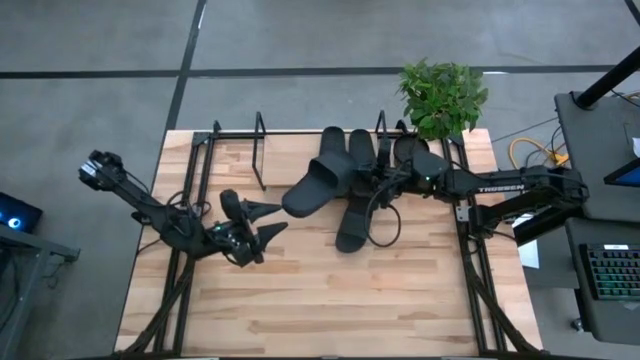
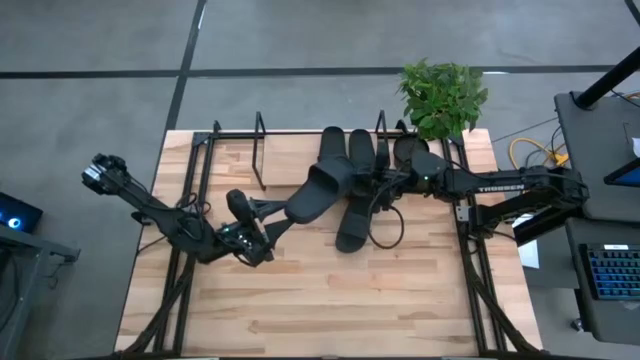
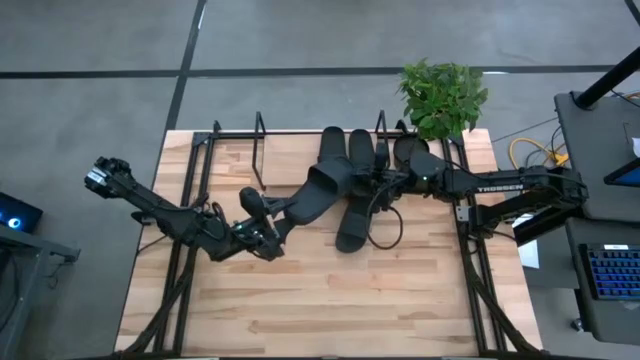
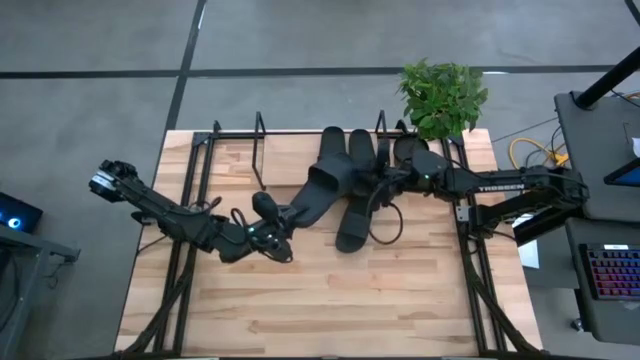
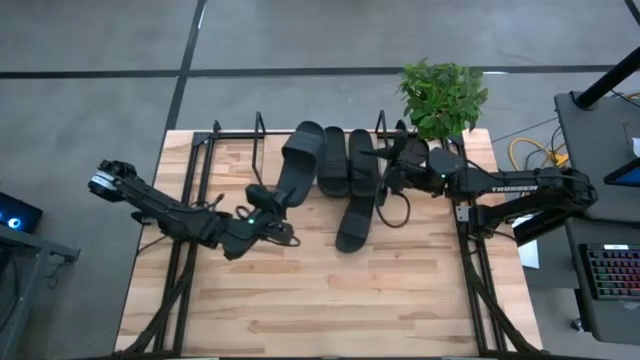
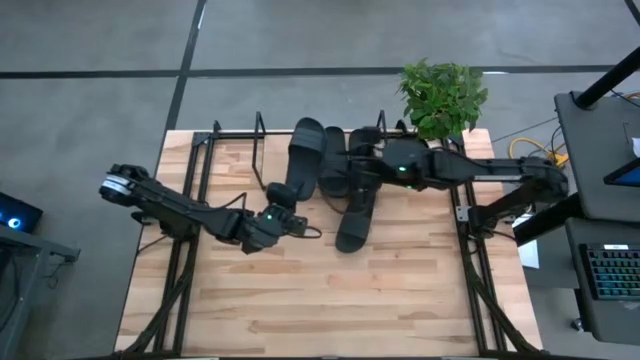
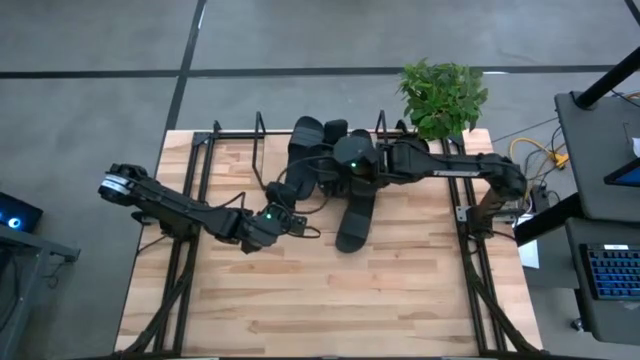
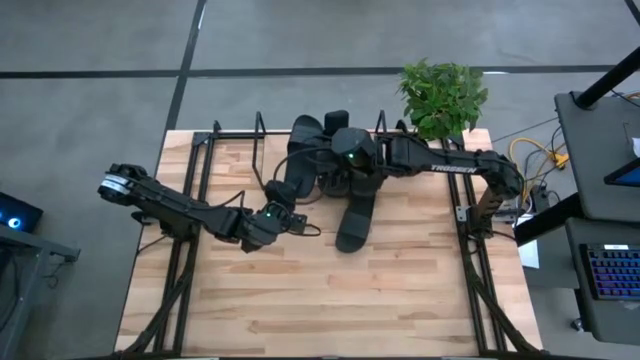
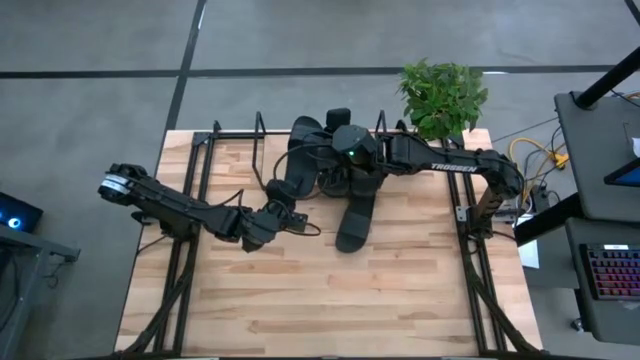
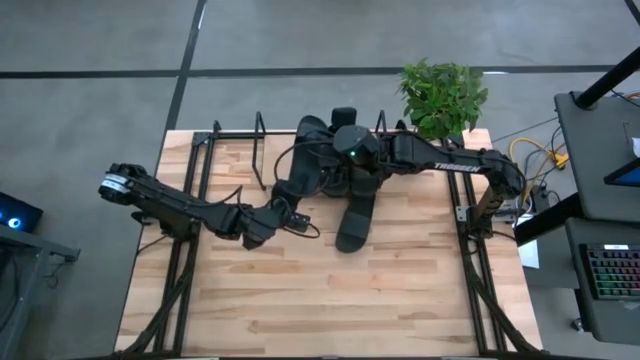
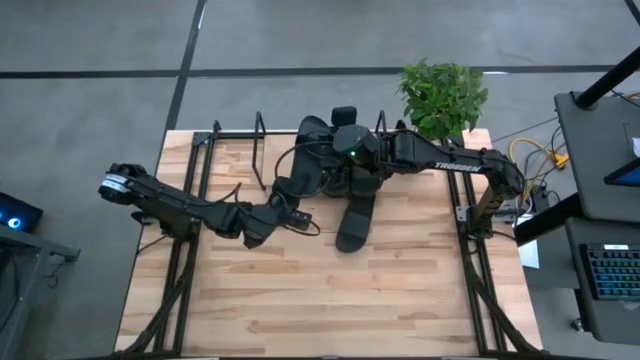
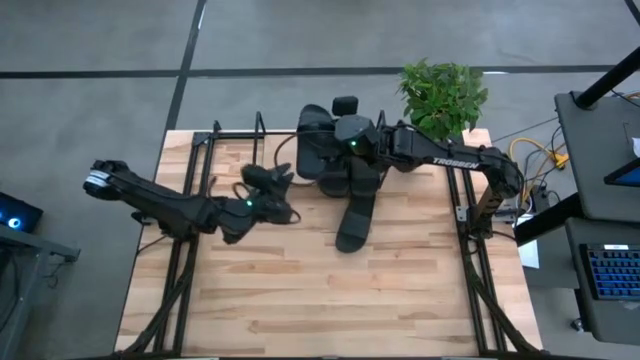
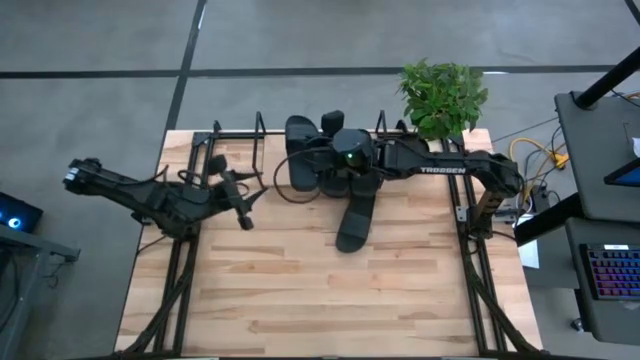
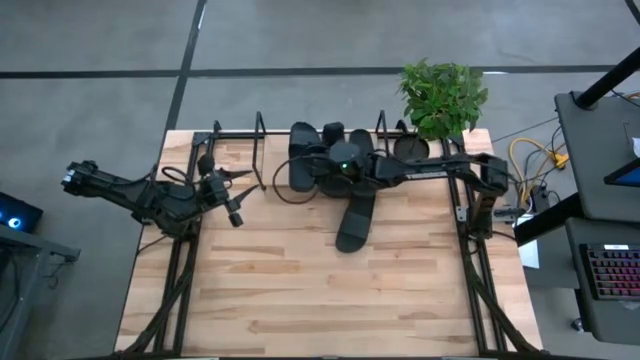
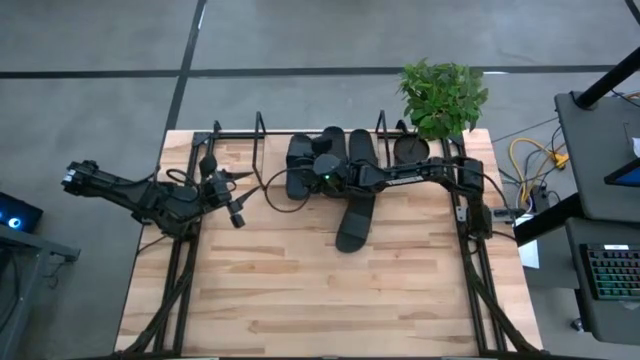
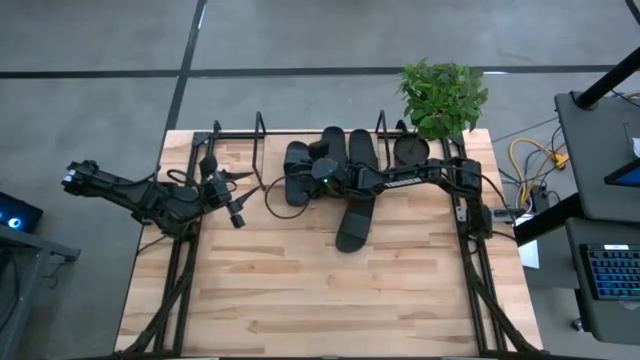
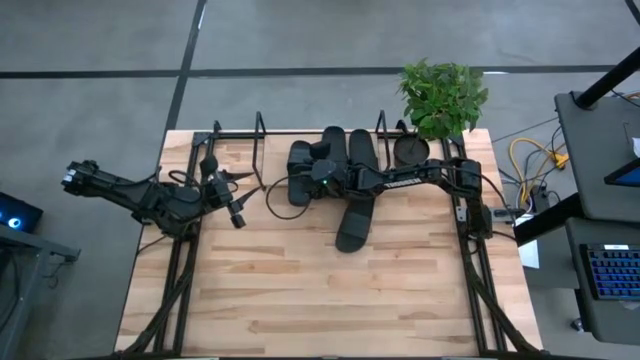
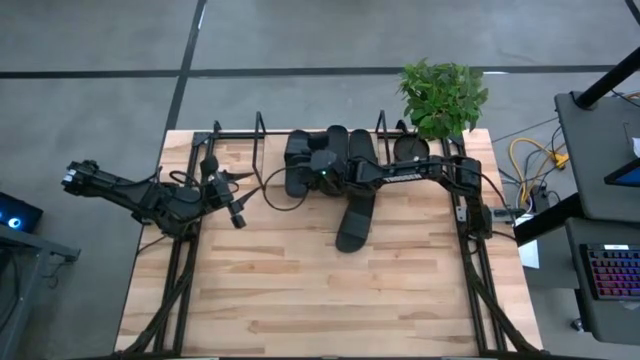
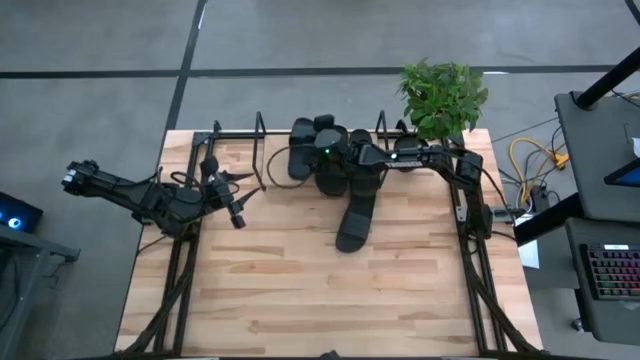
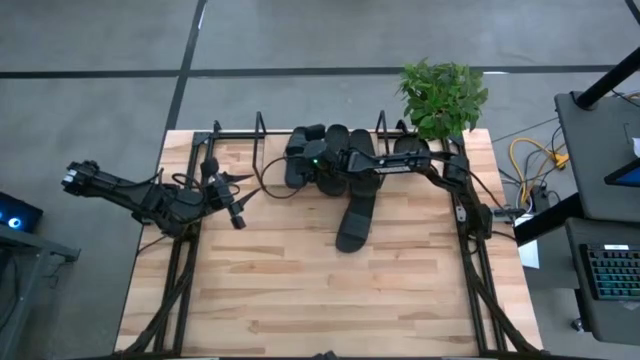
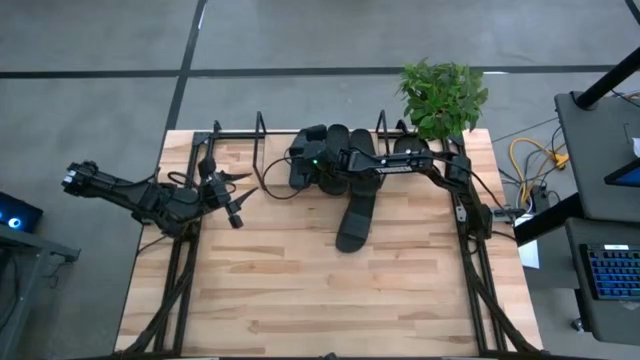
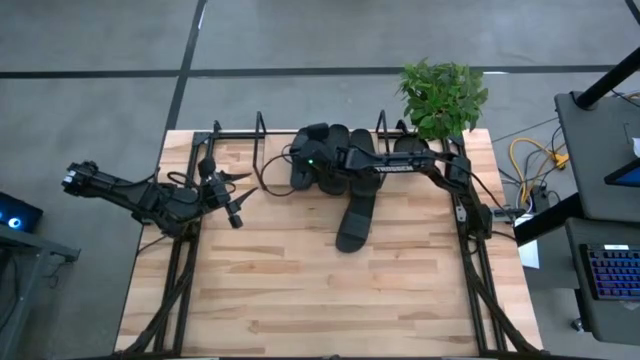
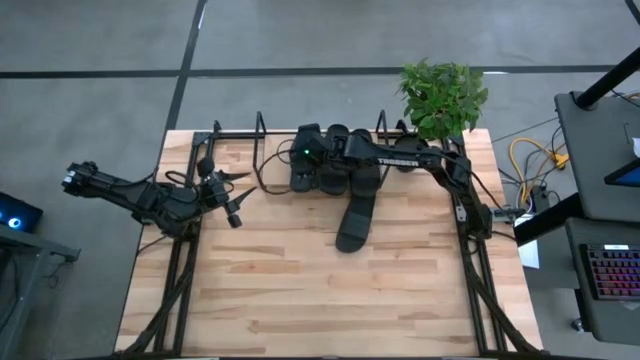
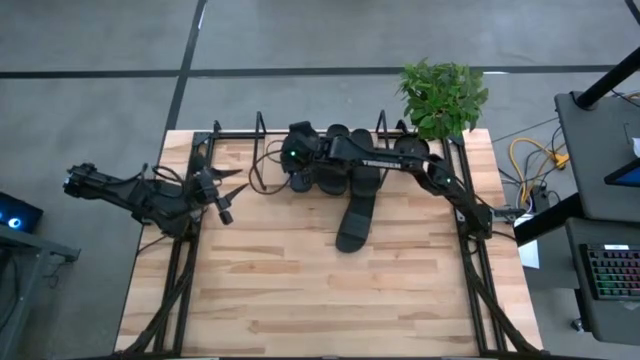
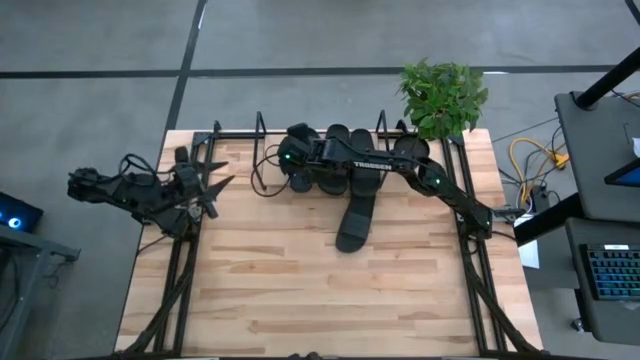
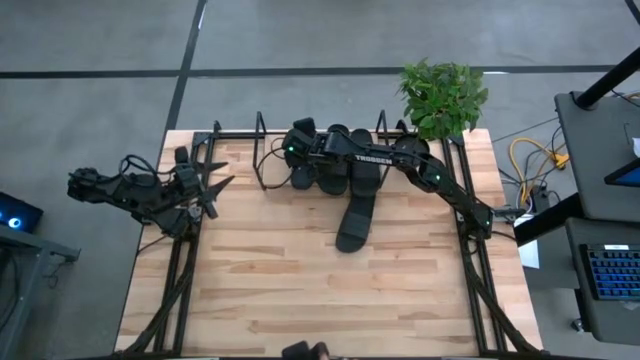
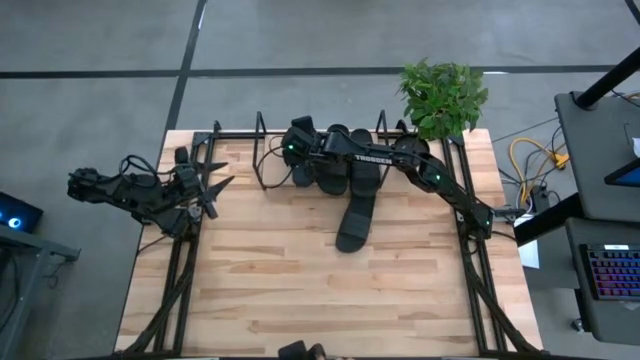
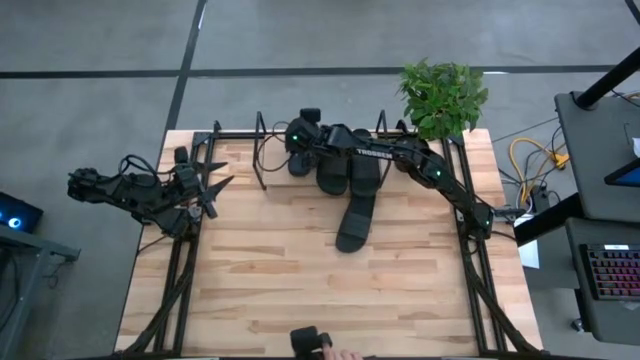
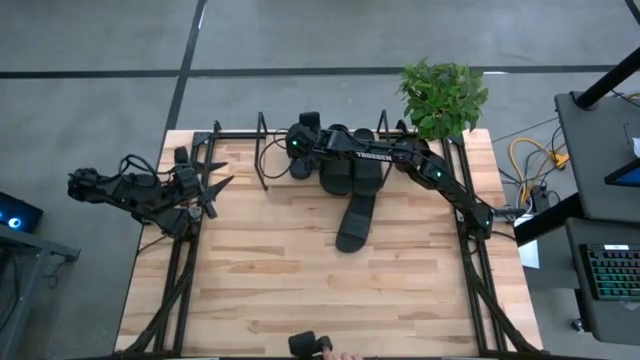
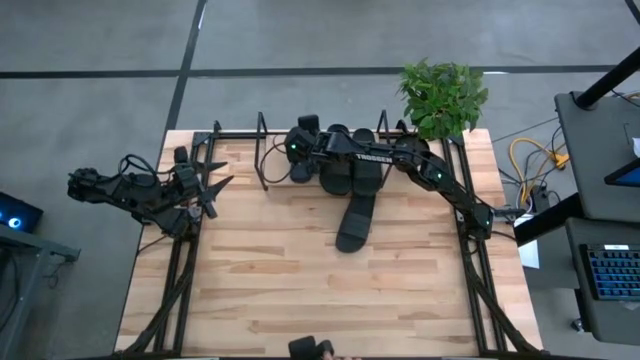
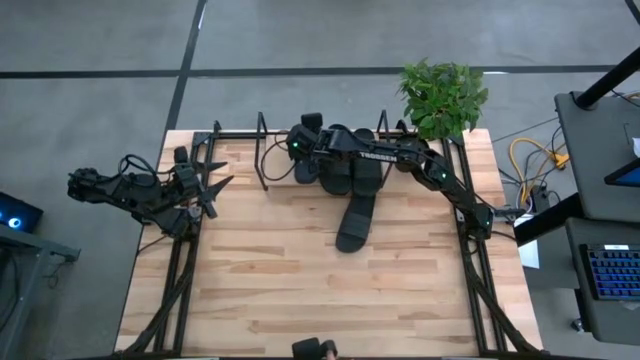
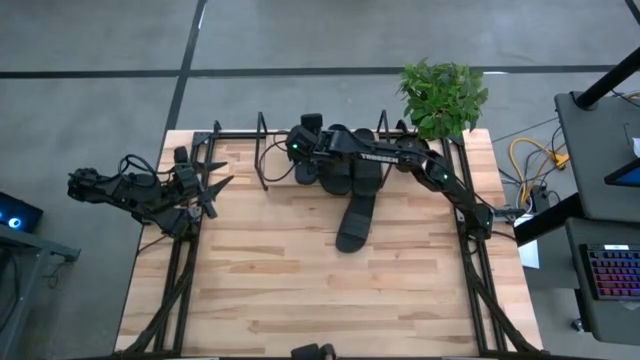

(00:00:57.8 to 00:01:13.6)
Task: Pick and place slides into the shelf
Put the top left black slides on the shelf
